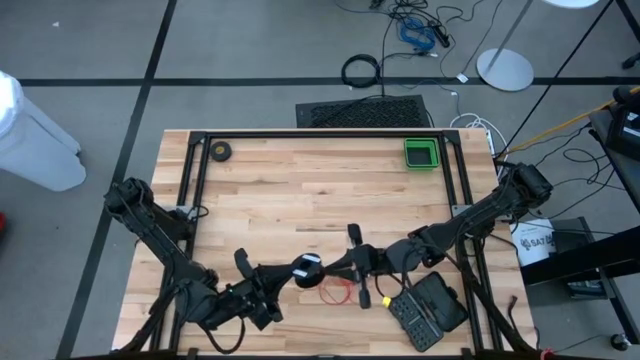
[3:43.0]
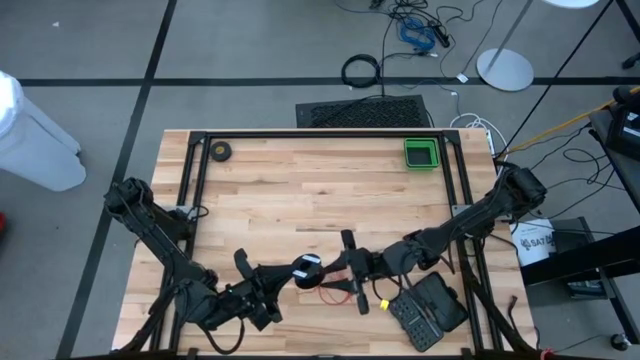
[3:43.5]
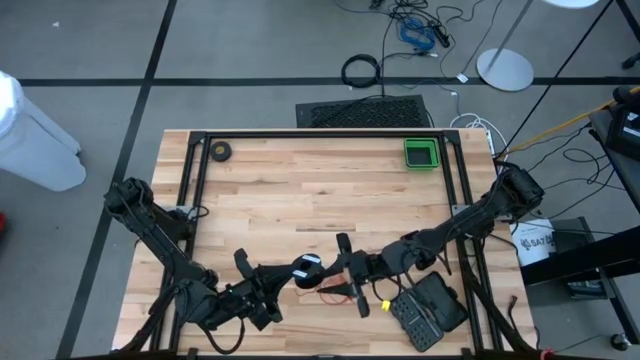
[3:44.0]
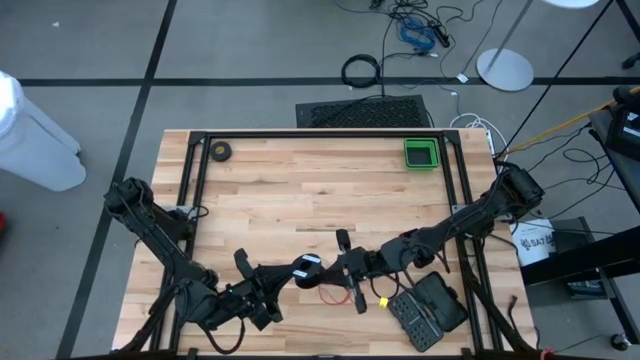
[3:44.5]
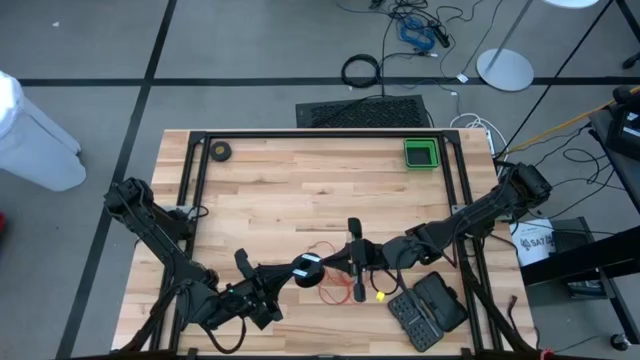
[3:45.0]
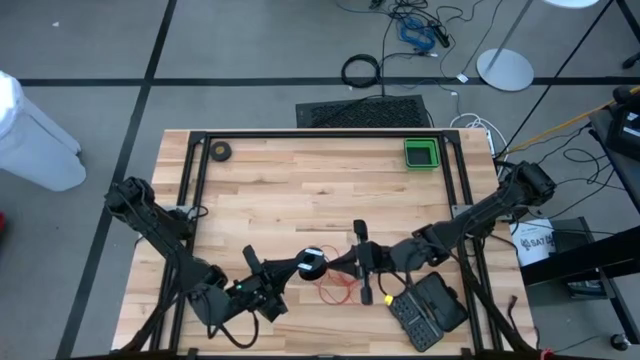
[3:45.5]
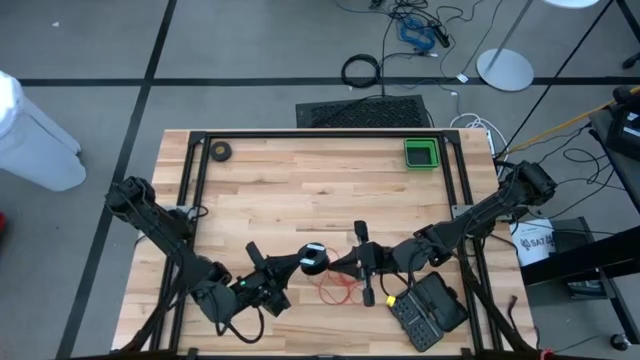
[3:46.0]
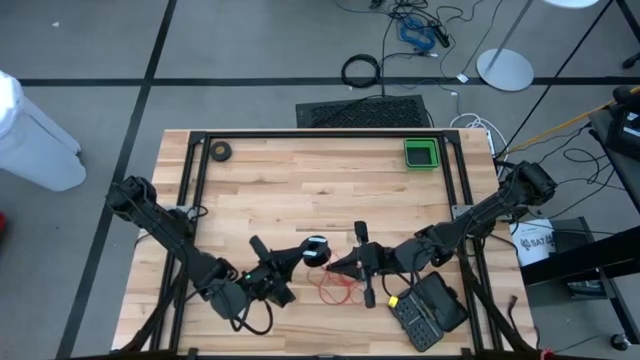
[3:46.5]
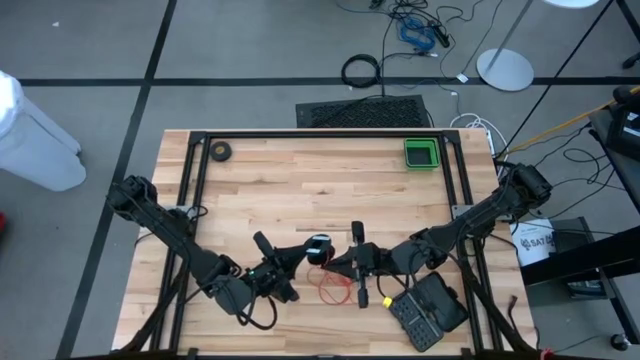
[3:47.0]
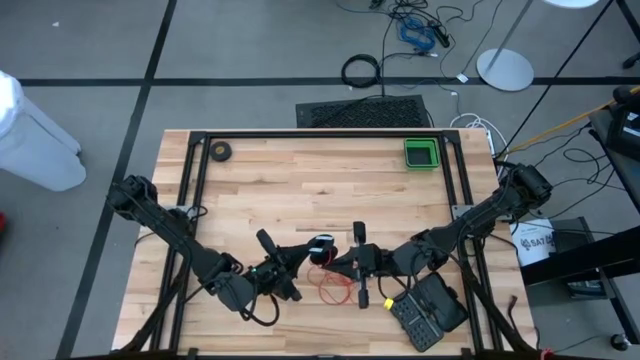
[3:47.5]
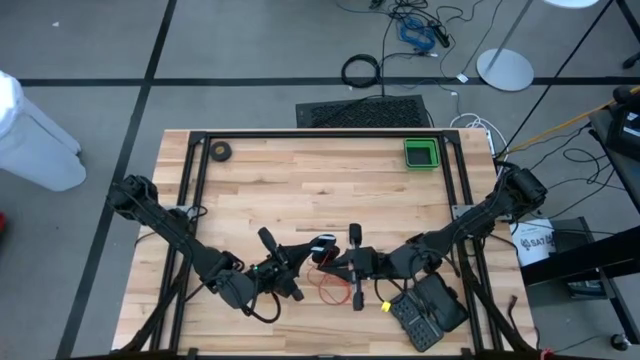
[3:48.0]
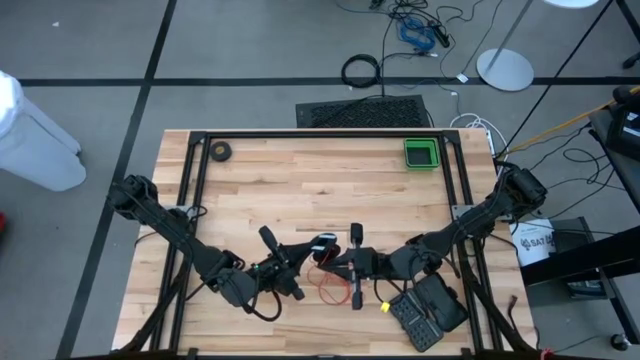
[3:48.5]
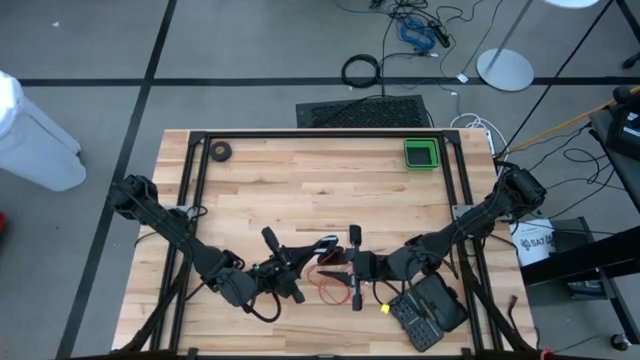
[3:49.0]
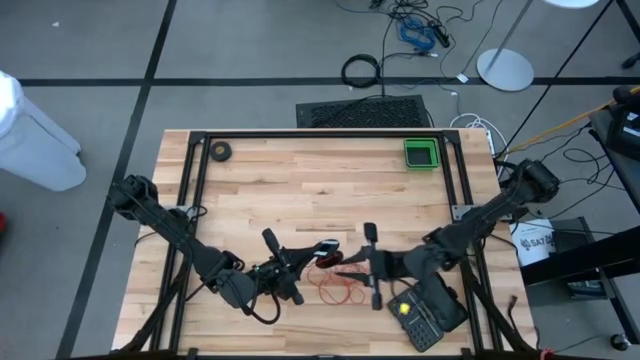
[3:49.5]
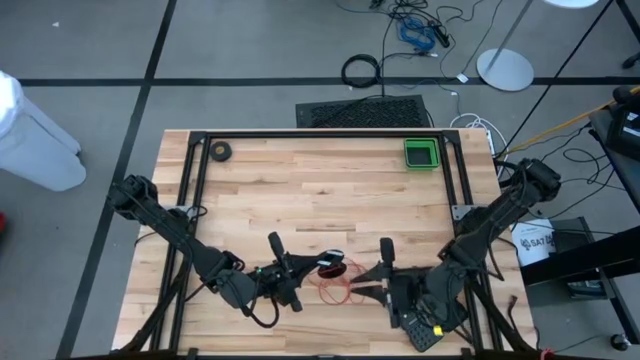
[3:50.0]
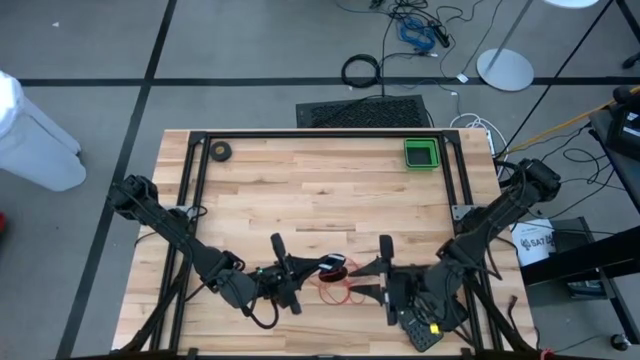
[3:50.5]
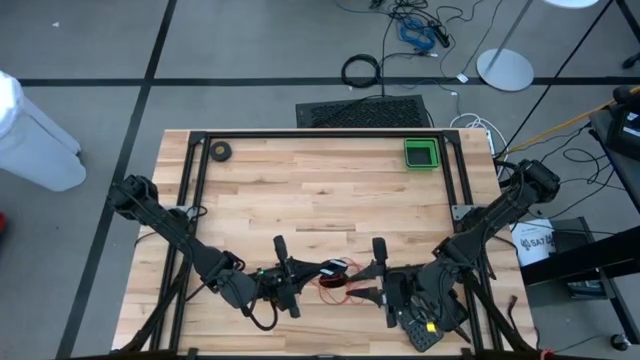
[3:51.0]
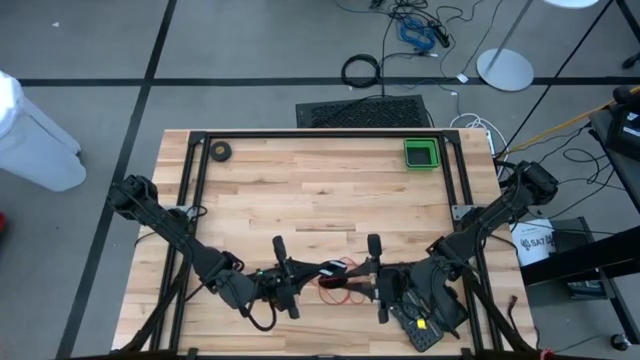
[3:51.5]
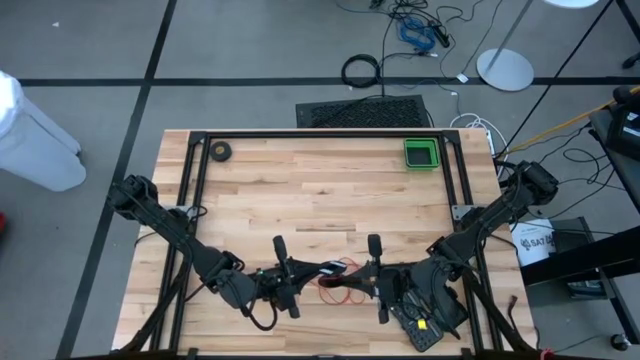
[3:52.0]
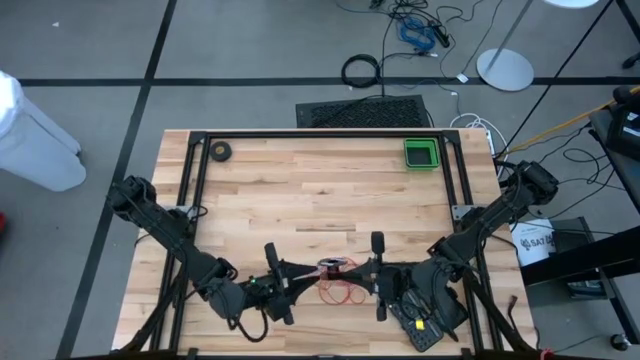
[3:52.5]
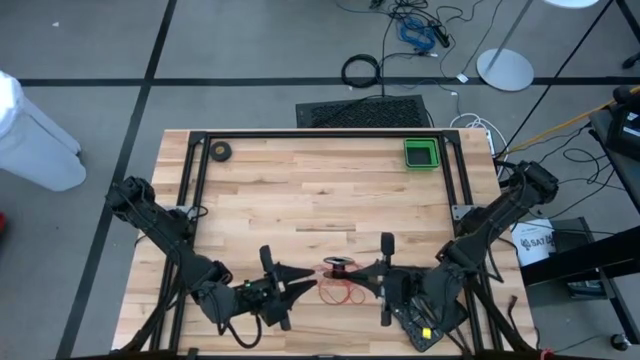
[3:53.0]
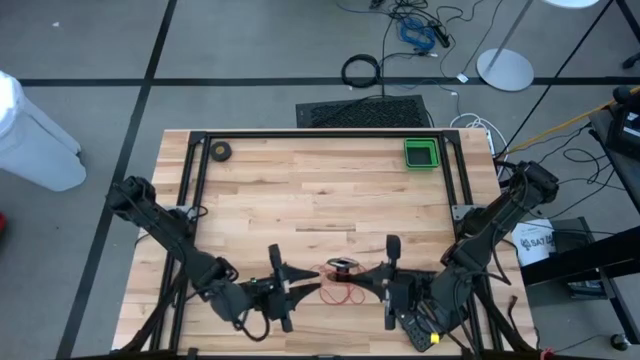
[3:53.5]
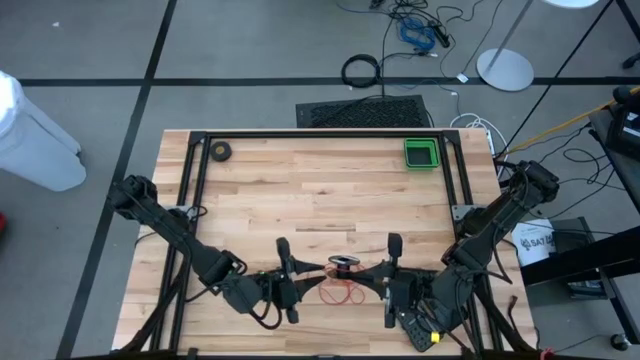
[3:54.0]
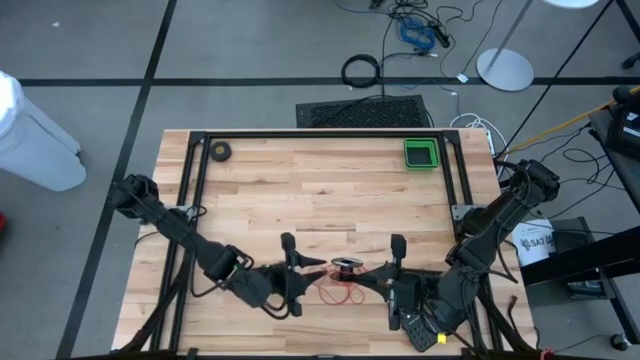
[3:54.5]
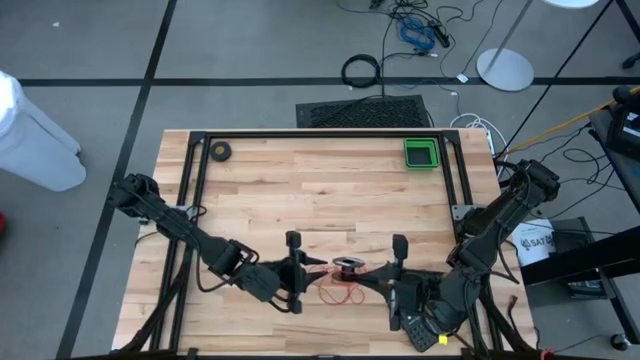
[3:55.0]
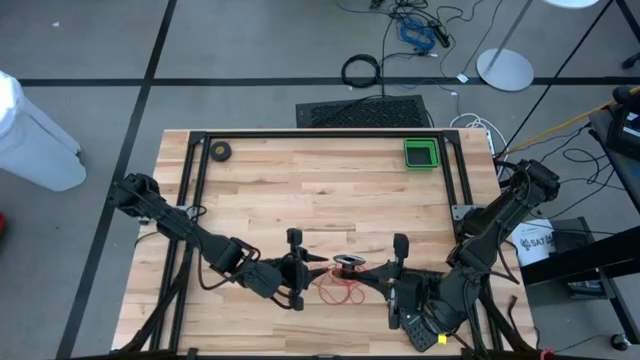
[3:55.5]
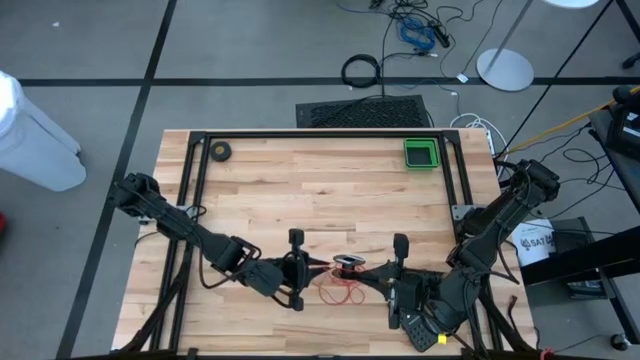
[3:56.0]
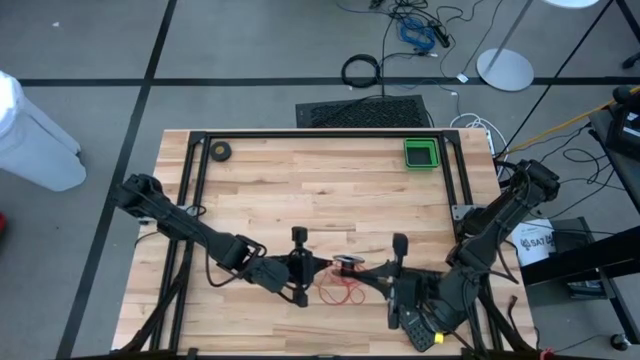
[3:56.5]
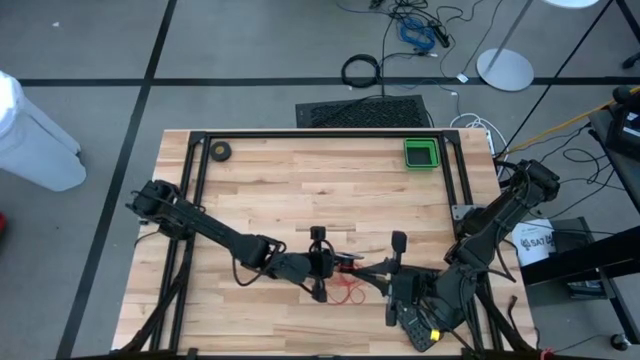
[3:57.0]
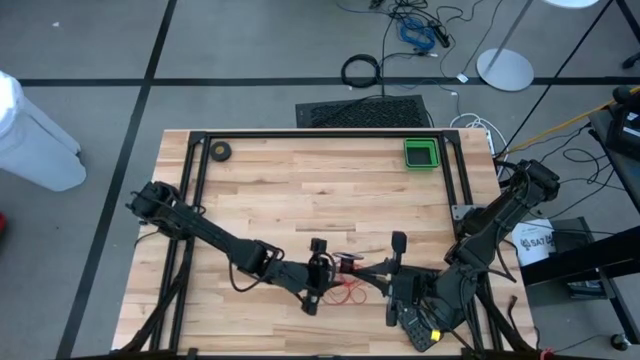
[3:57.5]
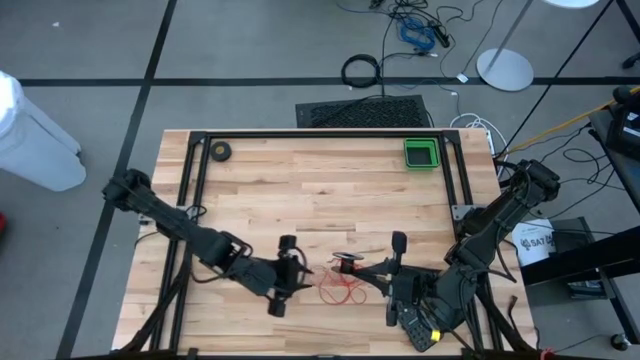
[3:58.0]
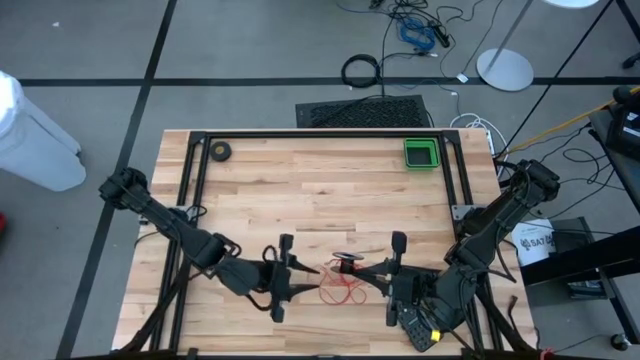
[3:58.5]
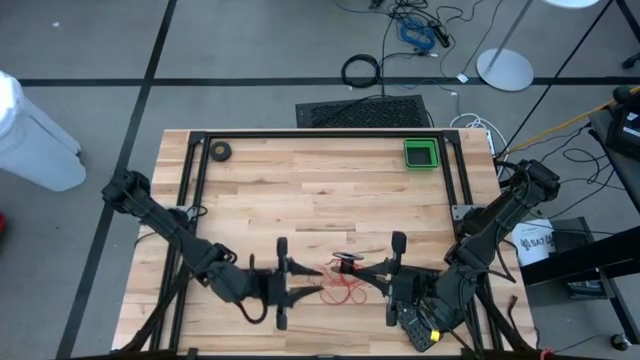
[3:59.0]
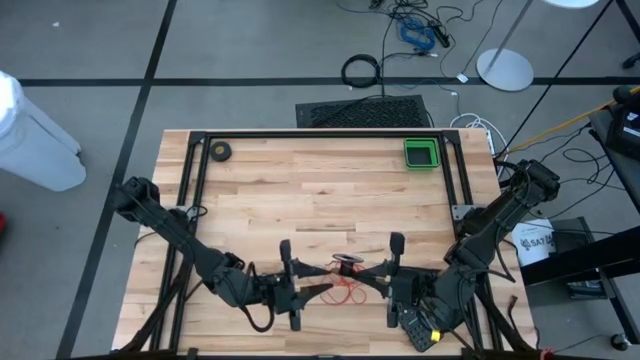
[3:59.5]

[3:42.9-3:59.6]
Task: Coil cords
Coil the red wire into the spool
